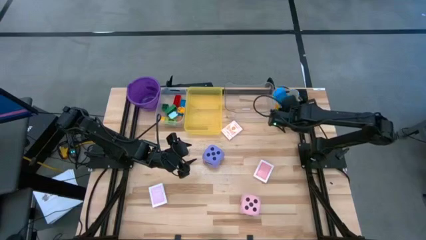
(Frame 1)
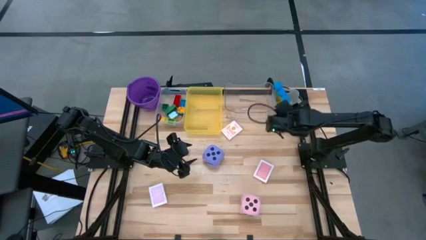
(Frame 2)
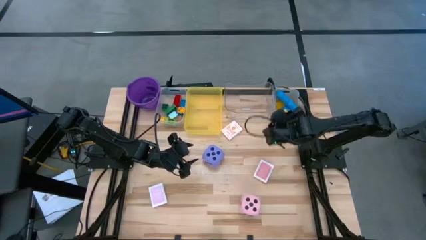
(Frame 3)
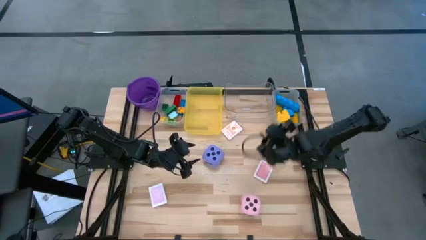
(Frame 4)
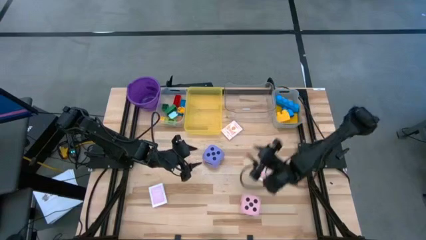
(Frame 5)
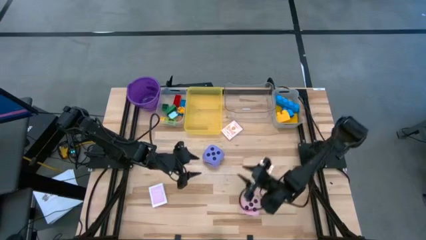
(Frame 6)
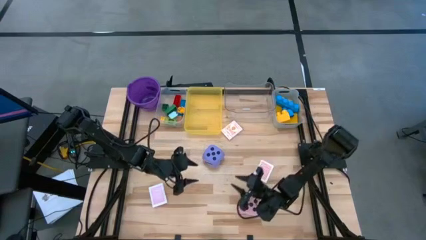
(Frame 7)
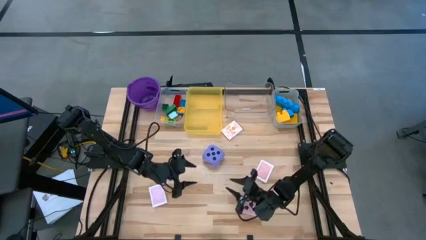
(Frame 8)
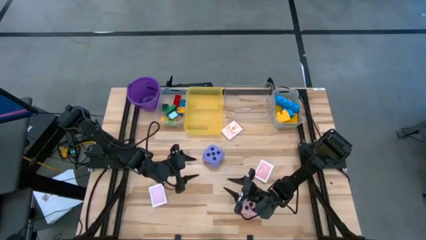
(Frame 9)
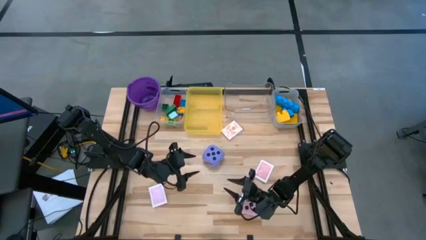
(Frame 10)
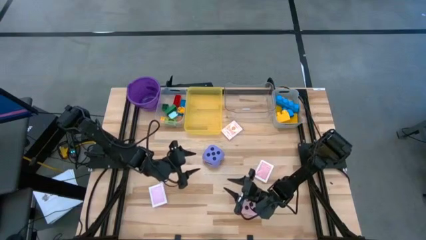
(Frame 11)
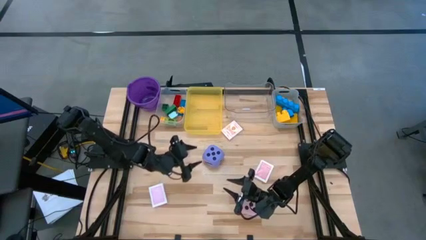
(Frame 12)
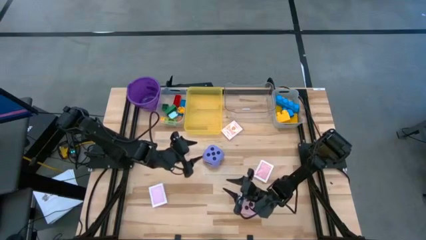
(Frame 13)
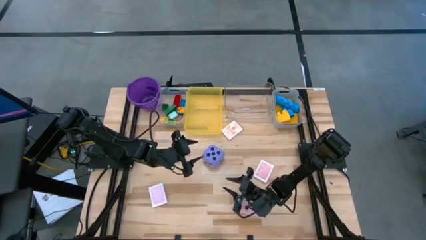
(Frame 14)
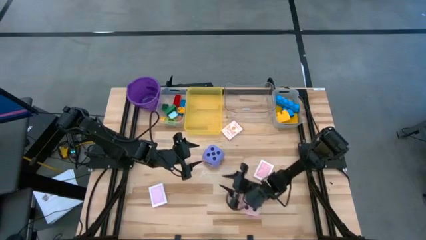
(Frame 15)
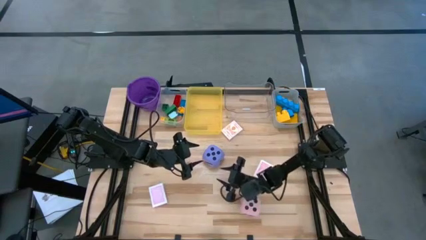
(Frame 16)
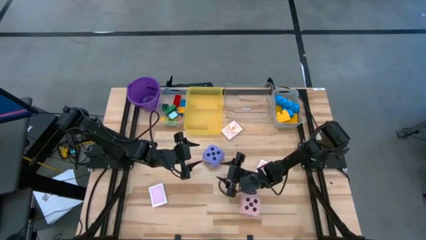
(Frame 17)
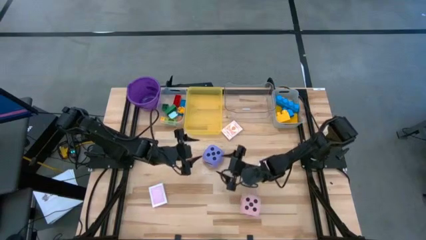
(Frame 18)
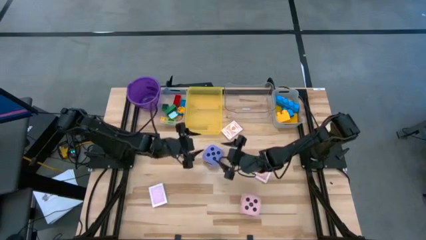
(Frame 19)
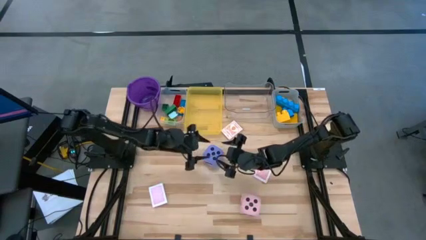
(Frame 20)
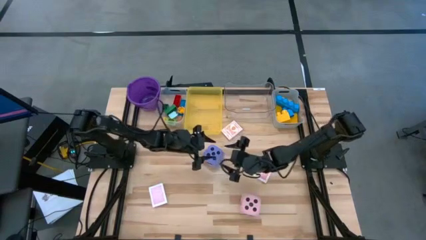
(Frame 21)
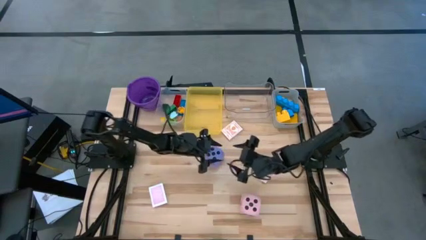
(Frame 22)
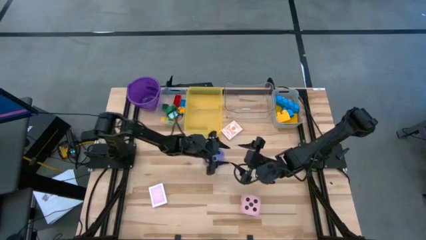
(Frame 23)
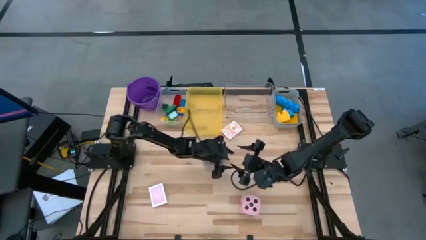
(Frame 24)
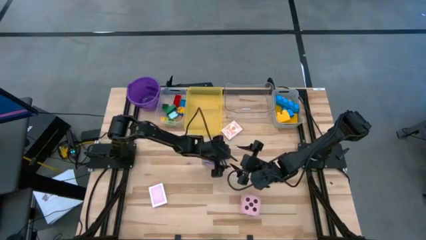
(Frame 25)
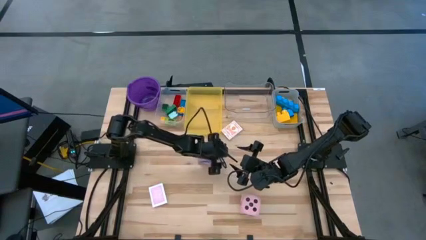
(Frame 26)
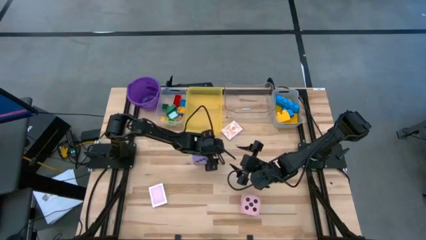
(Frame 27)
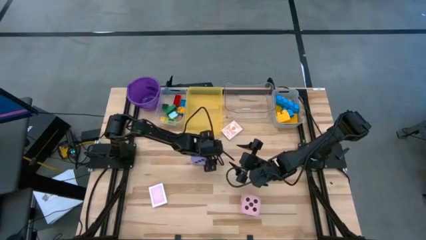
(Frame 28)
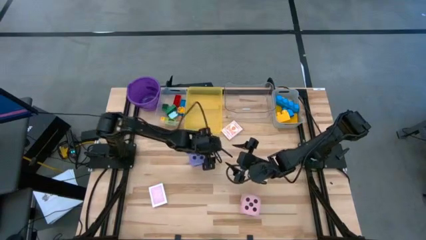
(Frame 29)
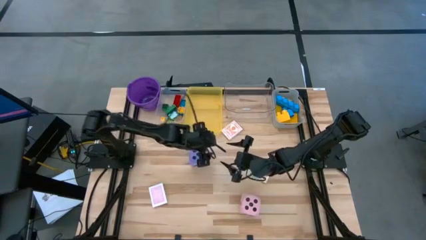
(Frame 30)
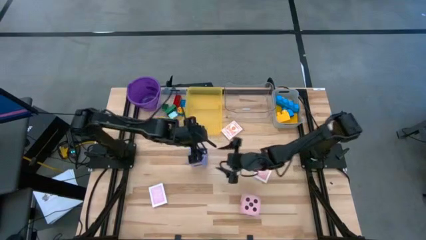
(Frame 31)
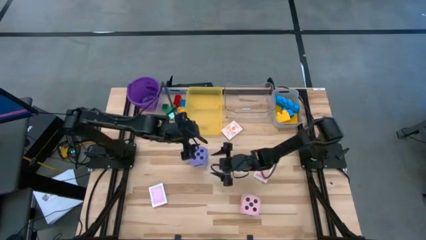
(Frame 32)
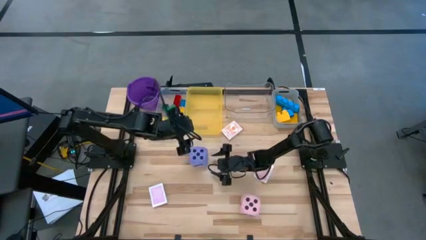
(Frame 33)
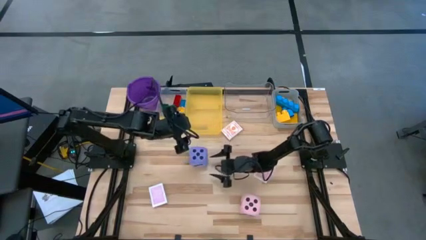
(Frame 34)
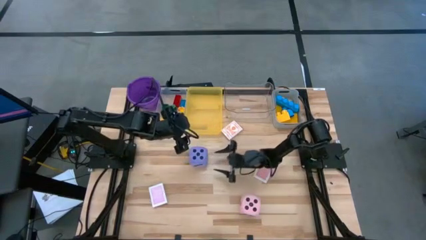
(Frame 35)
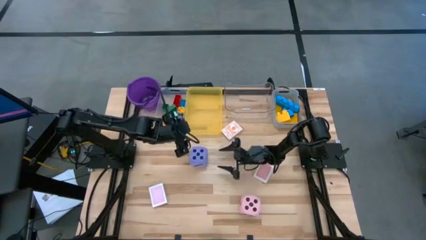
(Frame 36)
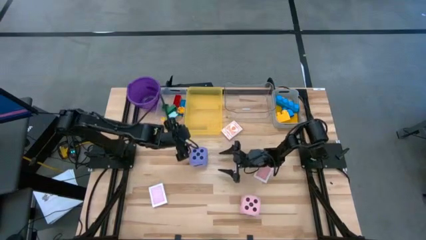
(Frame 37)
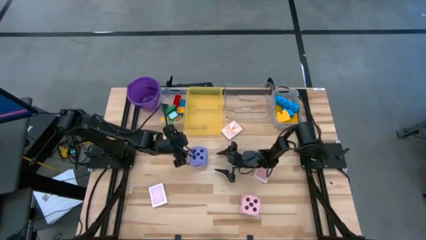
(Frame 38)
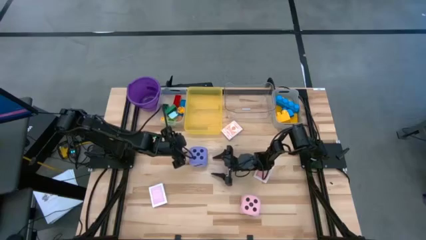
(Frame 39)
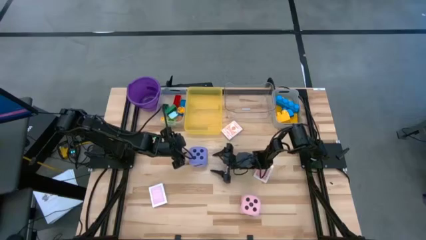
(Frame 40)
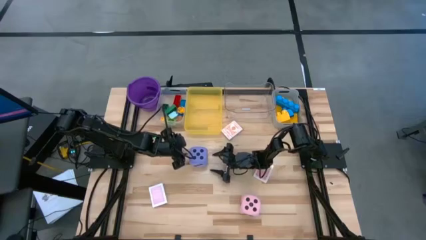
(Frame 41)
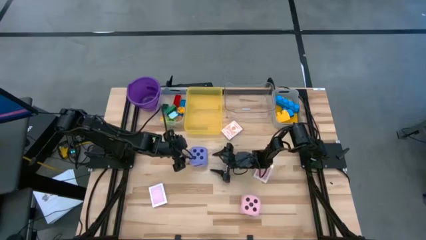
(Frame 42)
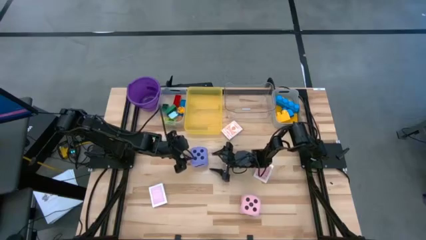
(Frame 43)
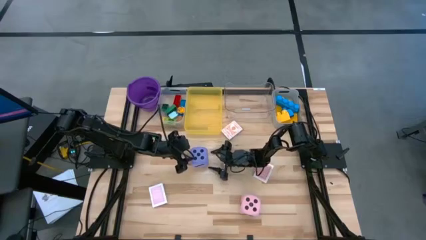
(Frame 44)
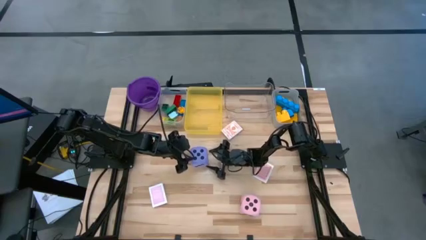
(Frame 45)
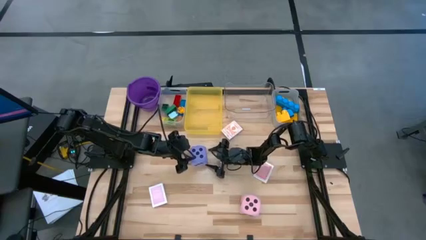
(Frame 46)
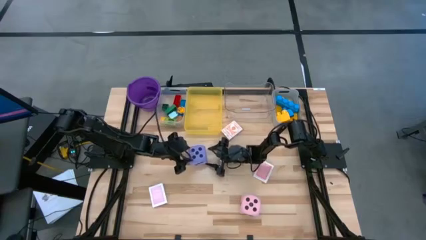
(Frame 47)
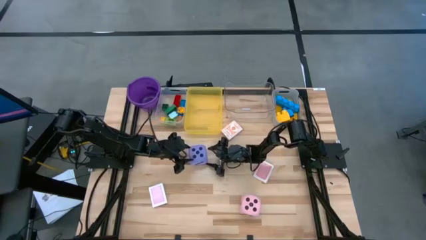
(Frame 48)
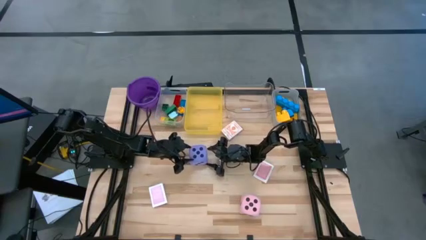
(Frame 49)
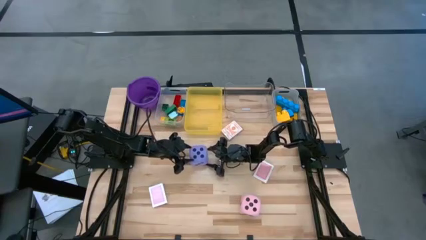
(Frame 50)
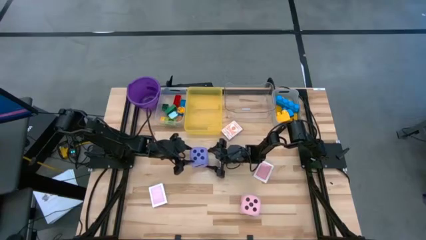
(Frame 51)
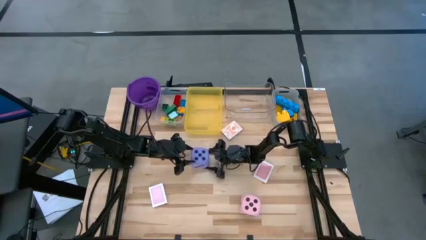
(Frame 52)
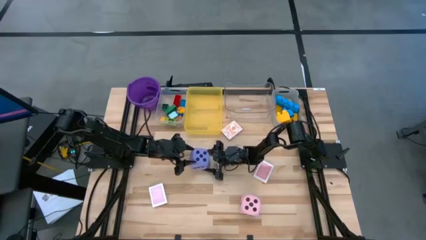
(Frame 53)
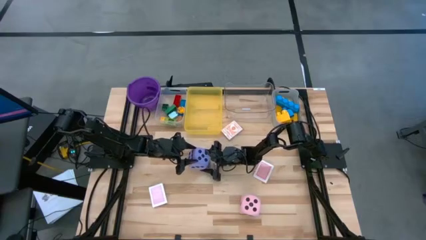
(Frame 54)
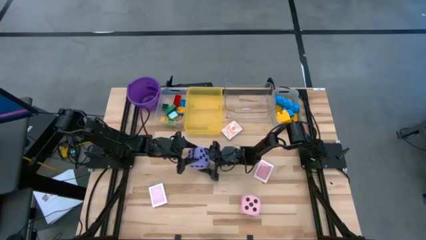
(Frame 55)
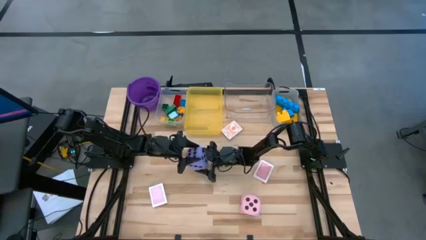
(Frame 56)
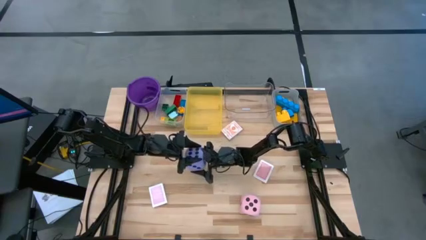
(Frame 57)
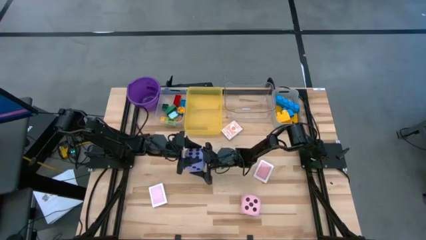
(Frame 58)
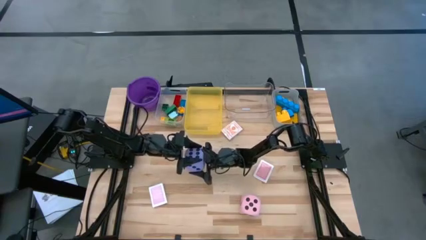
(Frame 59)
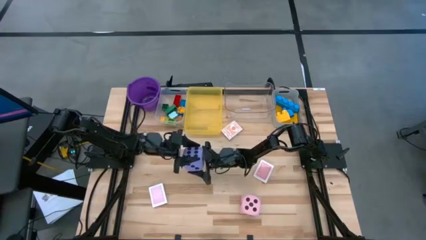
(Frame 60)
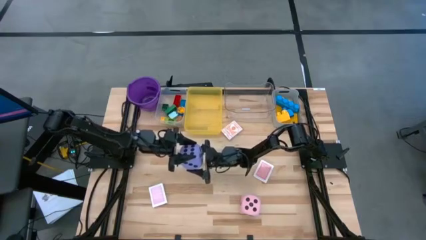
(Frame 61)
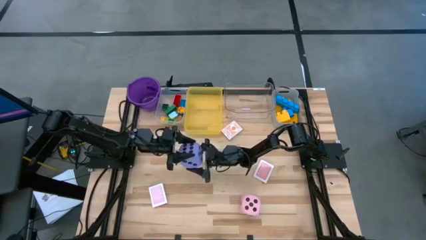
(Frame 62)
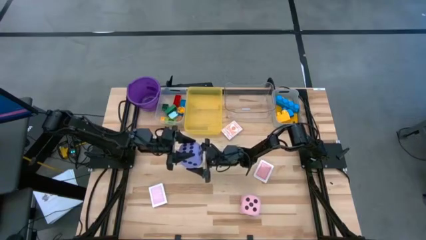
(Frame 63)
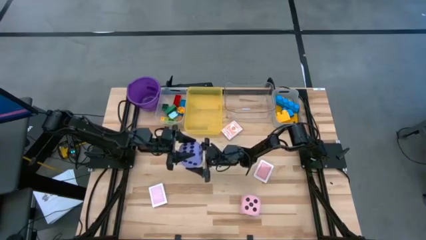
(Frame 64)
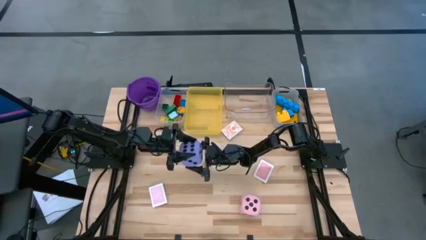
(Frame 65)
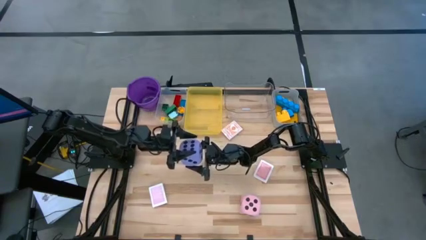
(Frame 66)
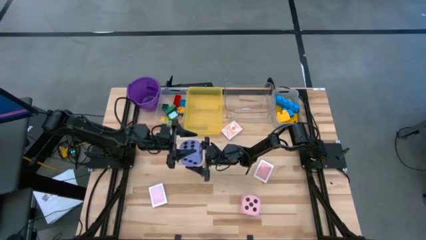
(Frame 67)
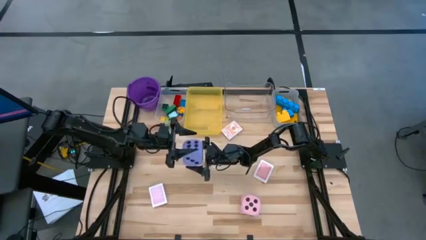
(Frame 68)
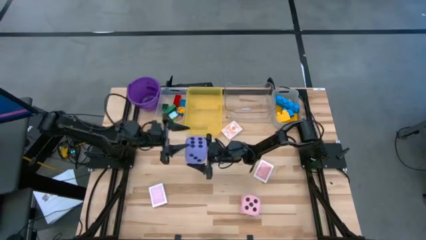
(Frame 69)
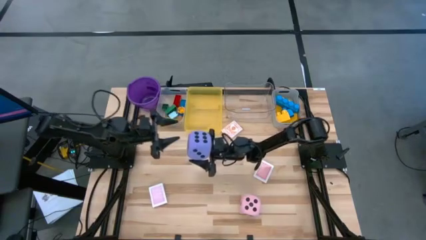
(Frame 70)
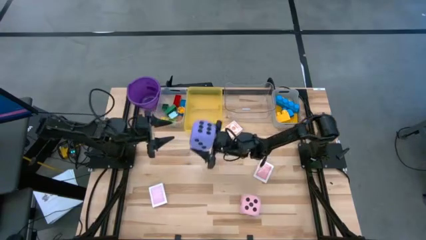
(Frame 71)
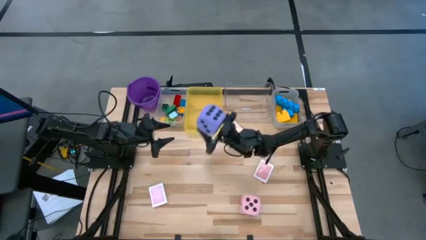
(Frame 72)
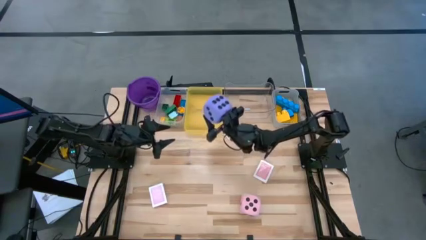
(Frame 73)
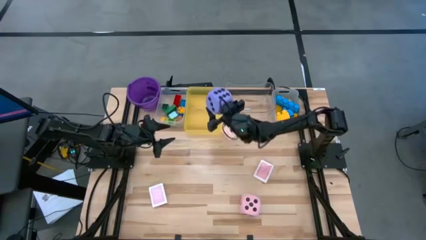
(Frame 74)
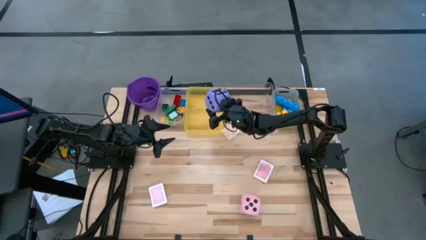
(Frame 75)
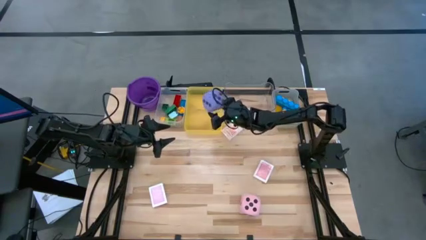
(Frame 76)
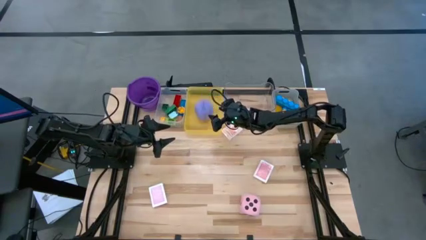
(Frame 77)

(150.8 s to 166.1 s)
Task: Pick & Place Toys
Put the large purple dice into the yellow bin

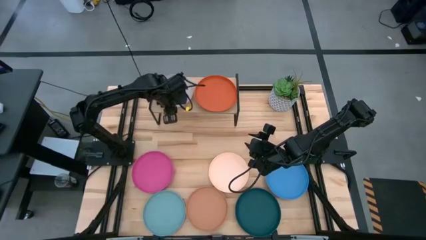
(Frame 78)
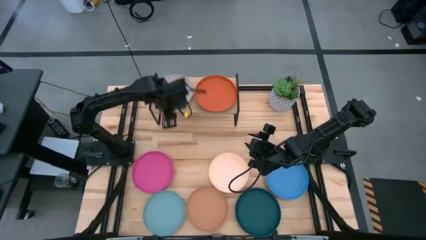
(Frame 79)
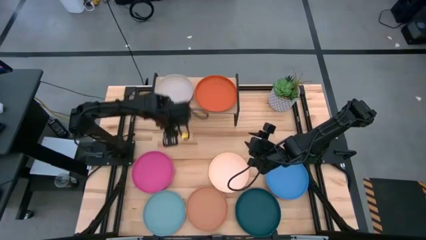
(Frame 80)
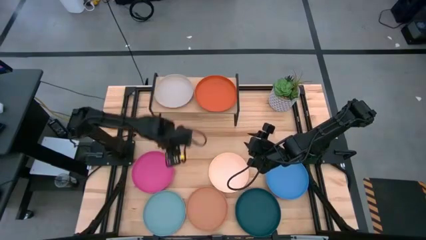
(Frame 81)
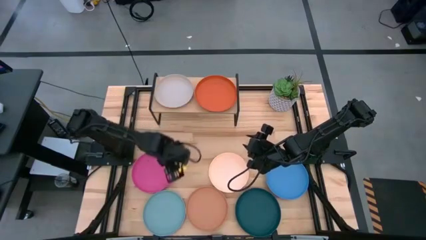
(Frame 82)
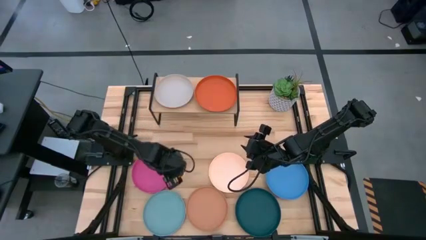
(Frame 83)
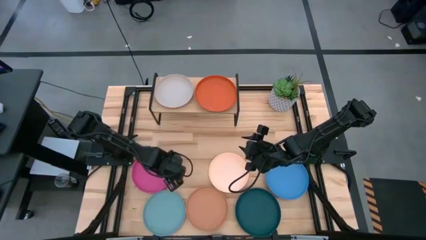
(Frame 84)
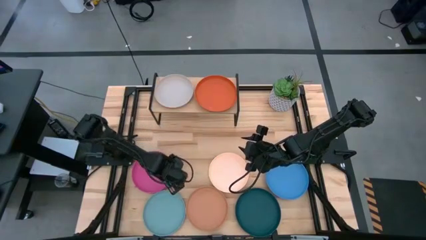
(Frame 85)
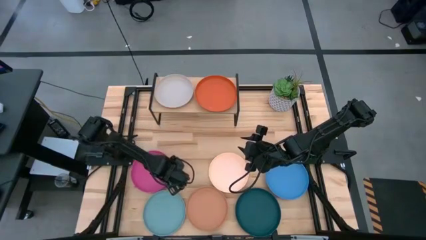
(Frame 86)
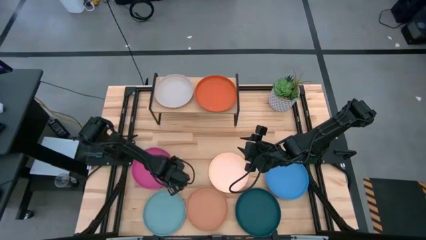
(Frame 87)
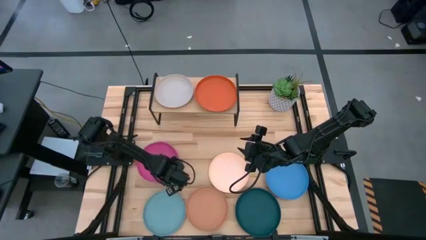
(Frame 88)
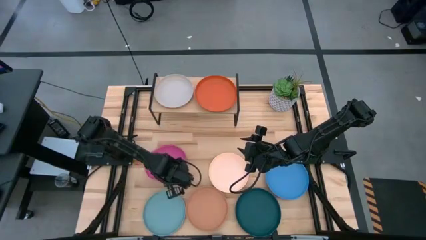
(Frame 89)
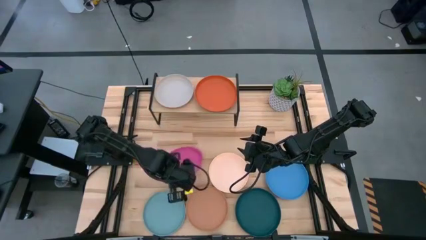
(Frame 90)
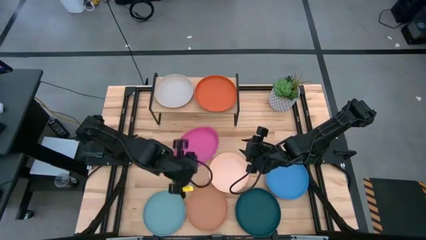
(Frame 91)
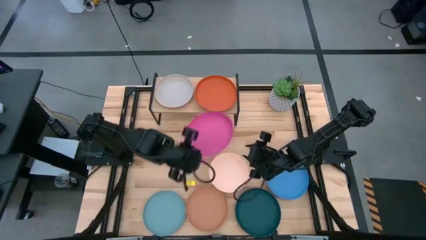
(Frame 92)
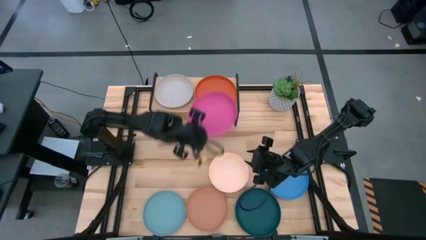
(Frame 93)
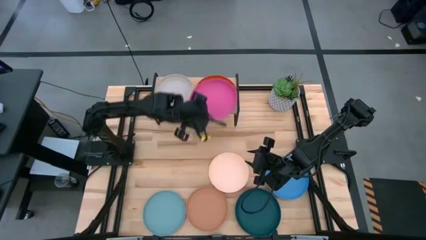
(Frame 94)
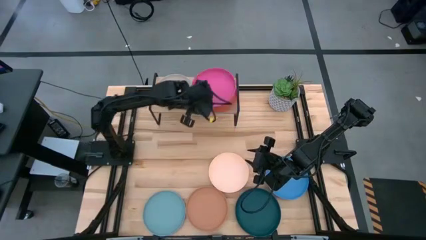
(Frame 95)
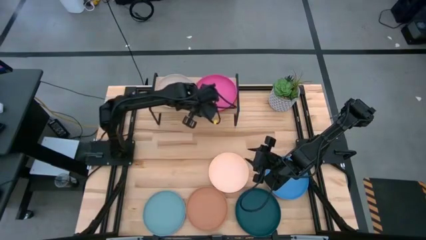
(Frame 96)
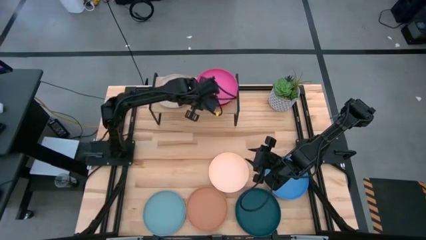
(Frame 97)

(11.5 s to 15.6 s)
Task: Place and stack plates onto a shelf
Stack the pink plate on top of the orange plate on the shelf
